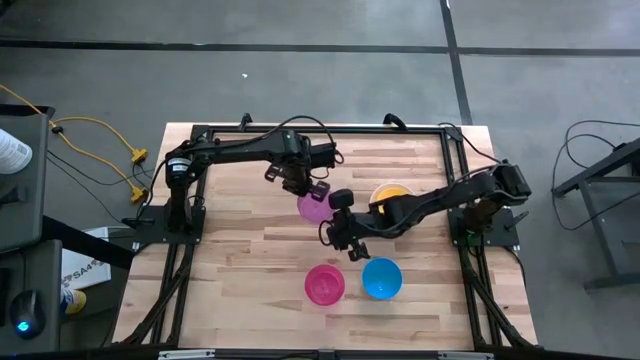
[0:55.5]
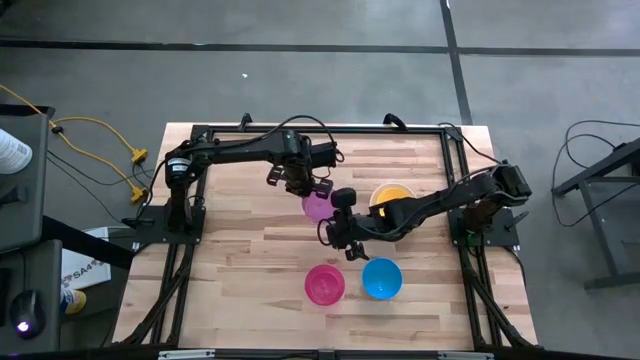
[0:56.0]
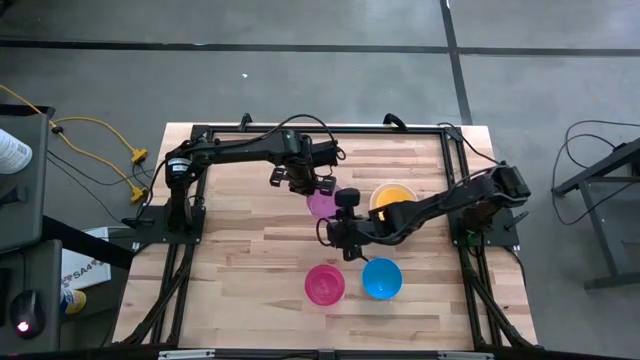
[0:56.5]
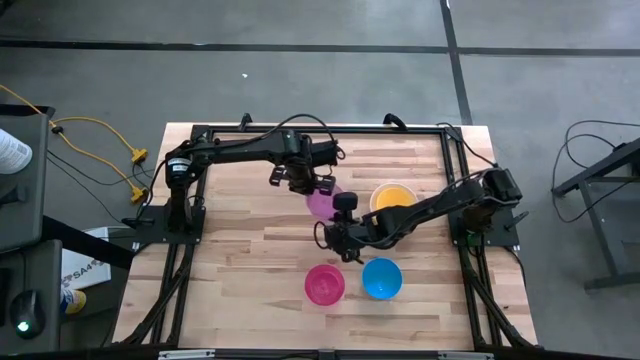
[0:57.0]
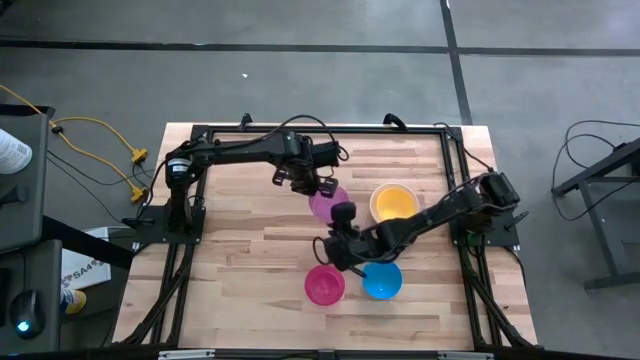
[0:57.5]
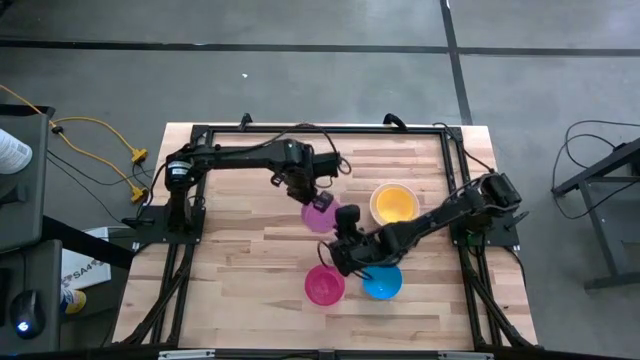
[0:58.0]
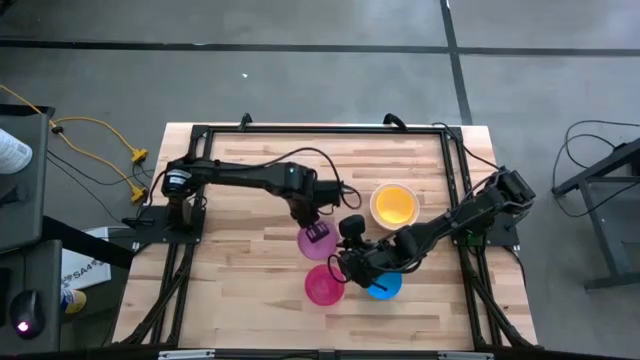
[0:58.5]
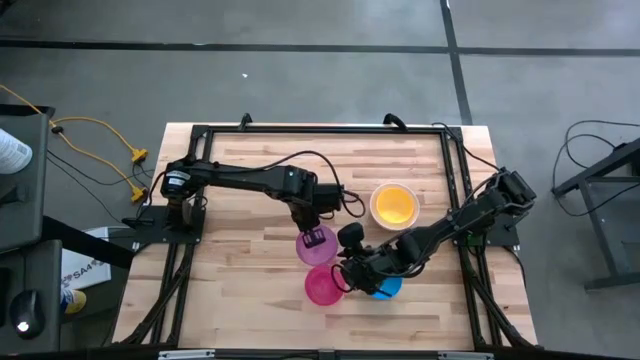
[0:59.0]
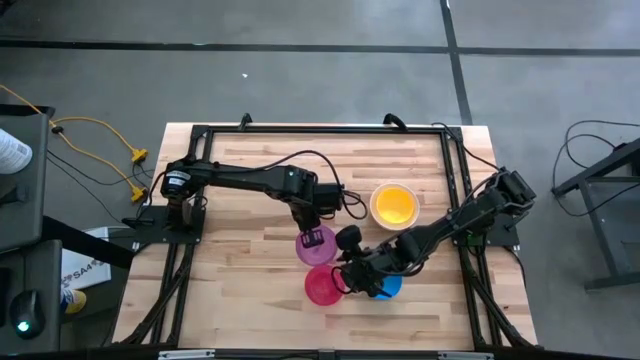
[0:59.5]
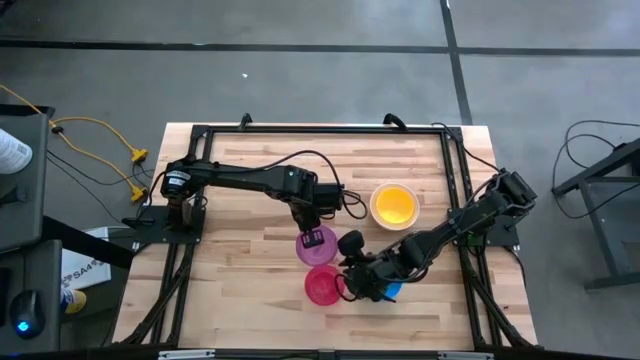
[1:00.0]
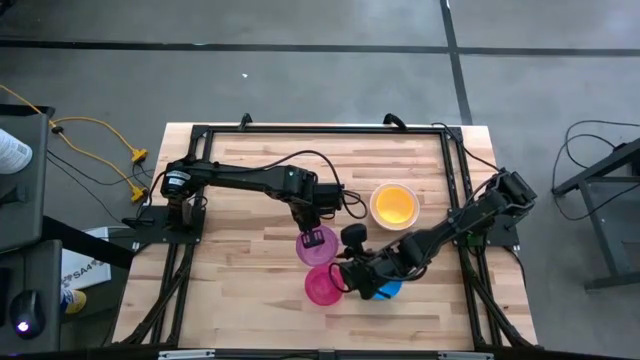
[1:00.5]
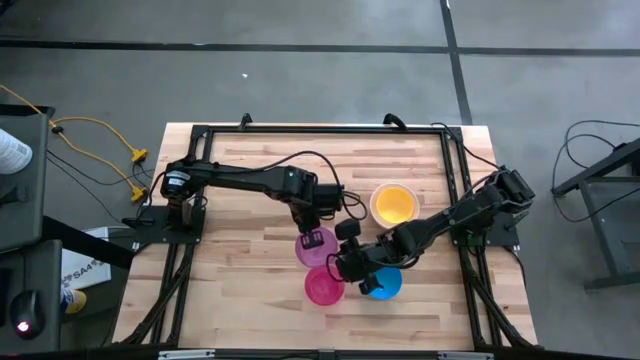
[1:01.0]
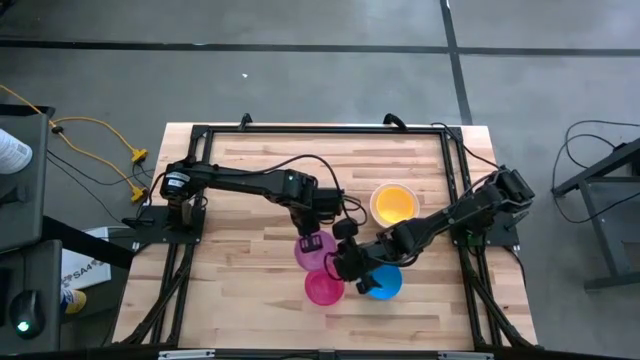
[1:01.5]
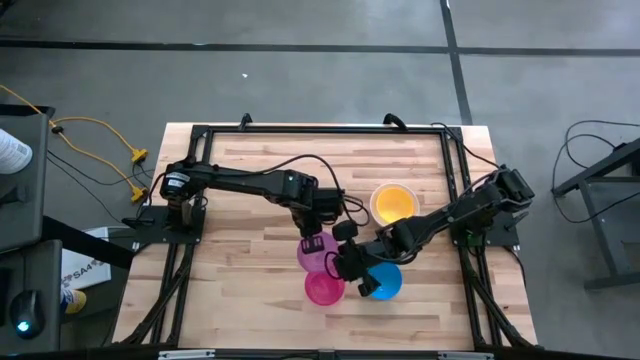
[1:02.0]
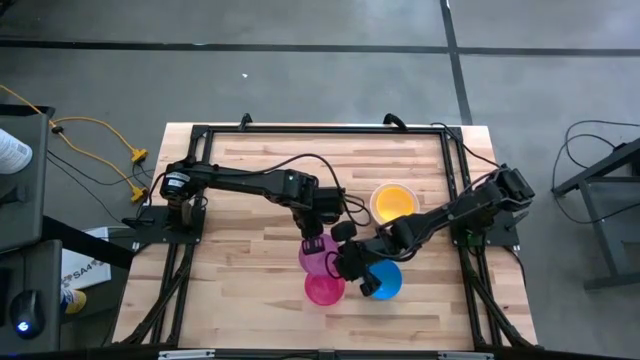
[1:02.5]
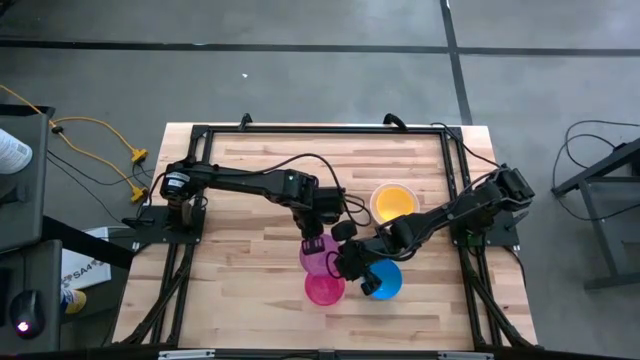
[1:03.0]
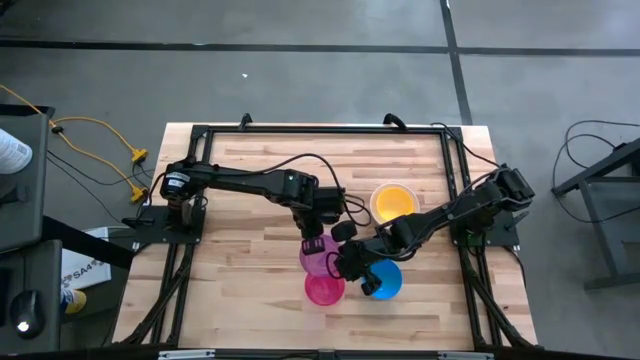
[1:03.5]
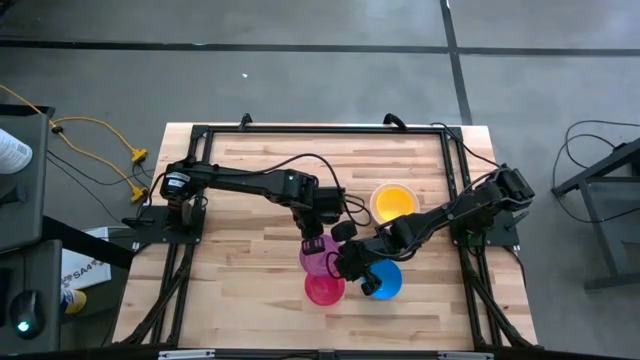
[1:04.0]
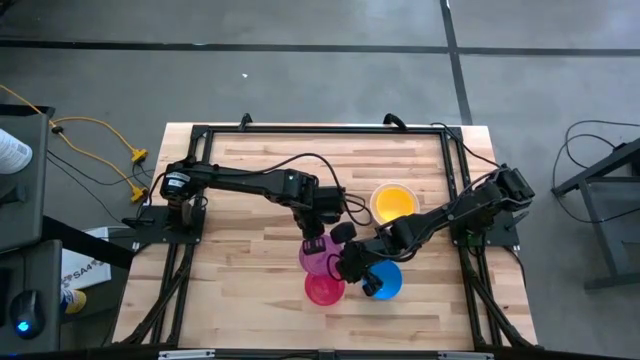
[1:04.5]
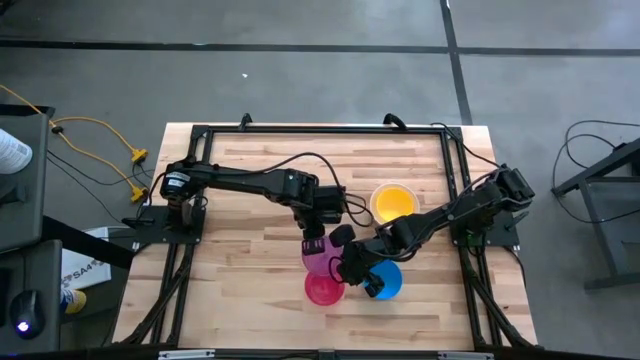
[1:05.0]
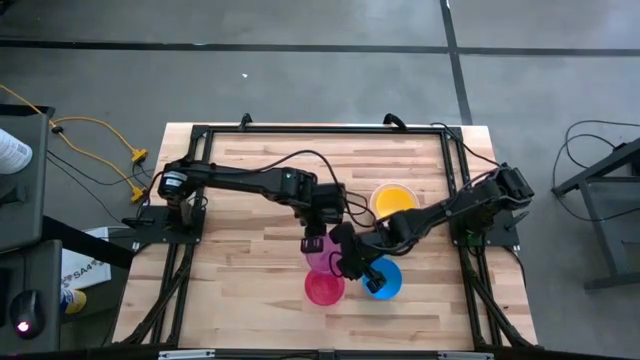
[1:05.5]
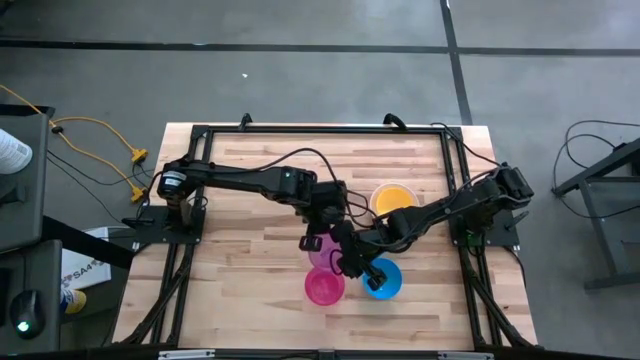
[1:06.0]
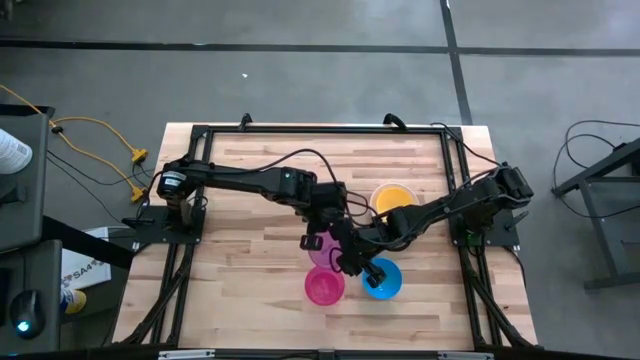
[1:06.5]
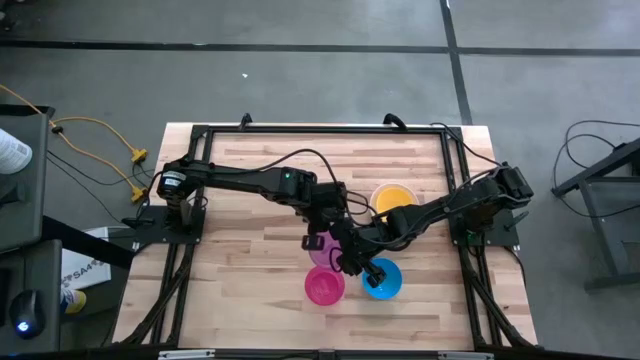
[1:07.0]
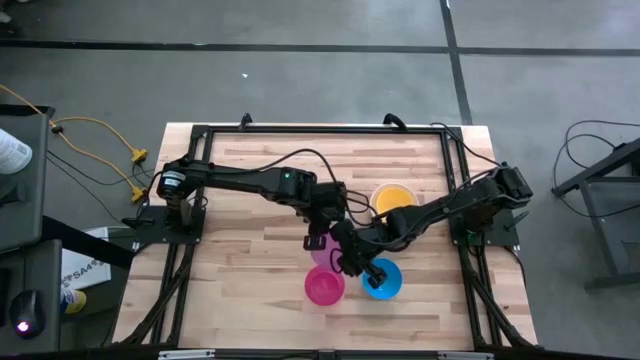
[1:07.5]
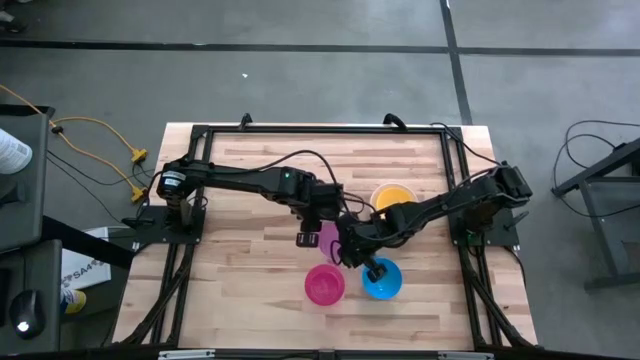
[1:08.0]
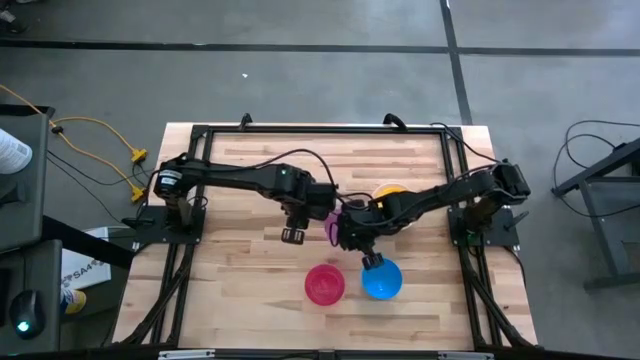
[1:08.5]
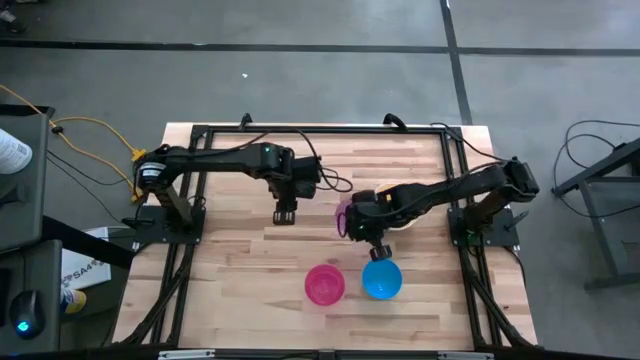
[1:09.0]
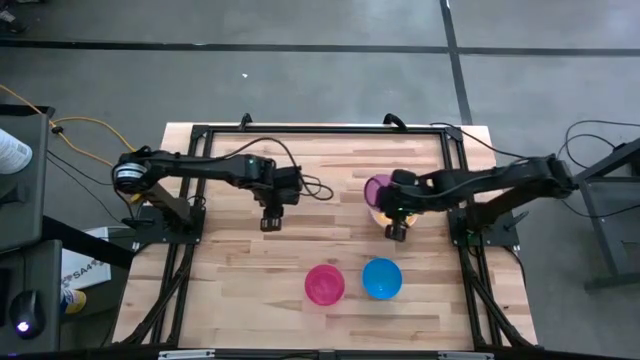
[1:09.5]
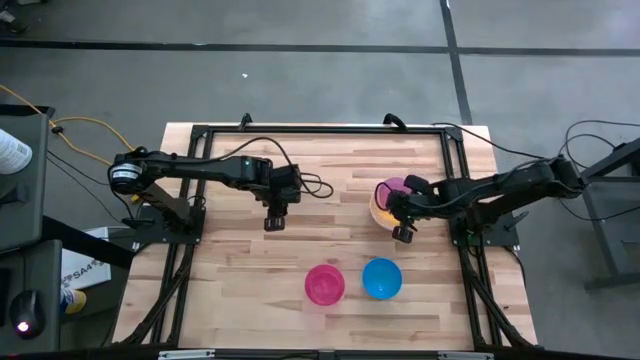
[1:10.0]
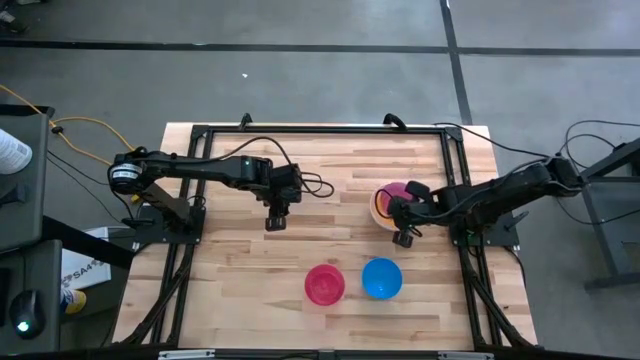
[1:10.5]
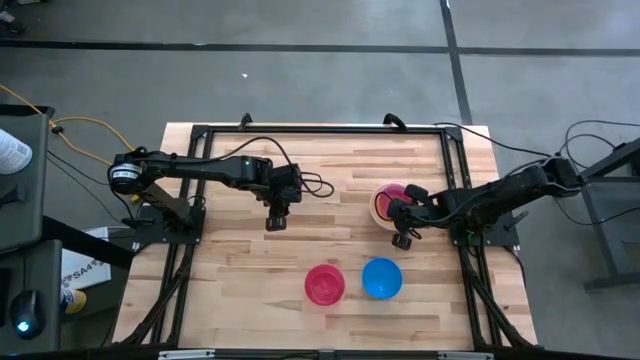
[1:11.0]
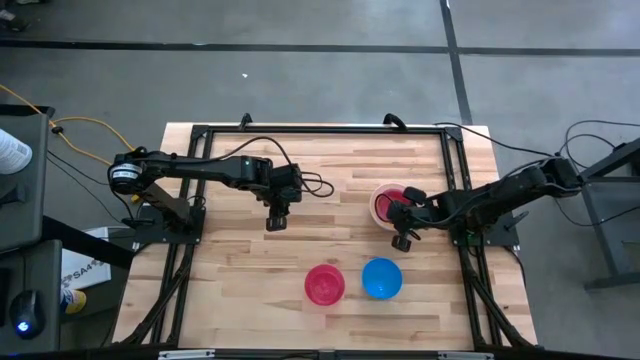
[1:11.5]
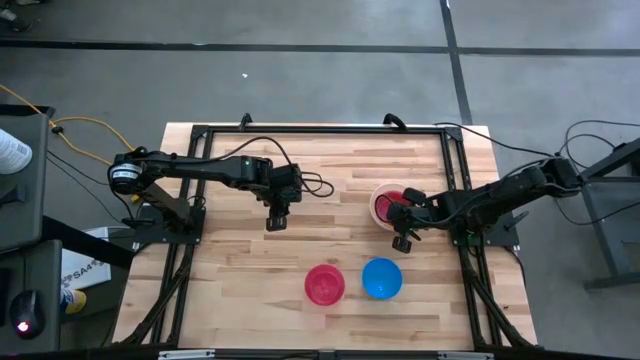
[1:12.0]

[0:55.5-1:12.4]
Stack the violet bowl on top of the yellow bowl

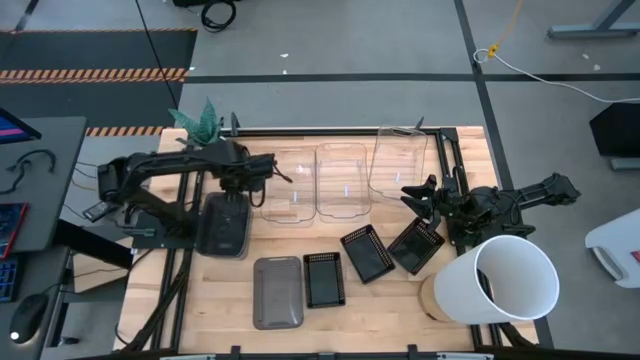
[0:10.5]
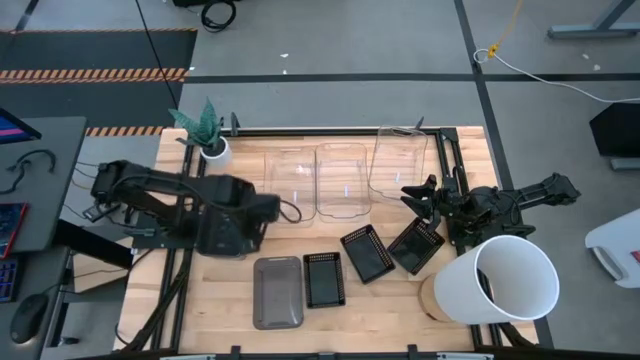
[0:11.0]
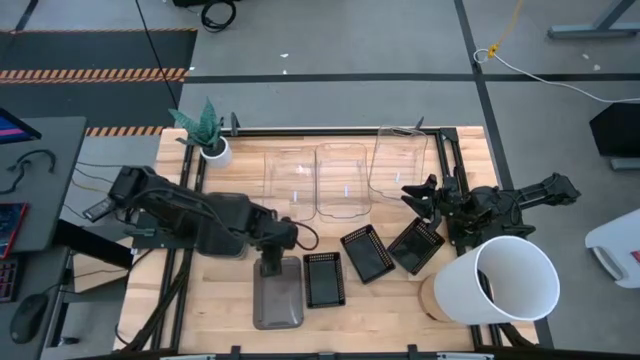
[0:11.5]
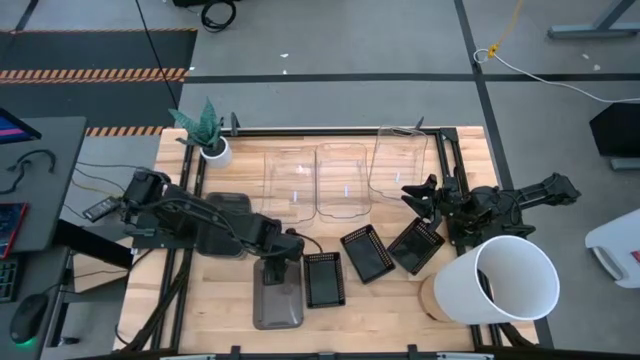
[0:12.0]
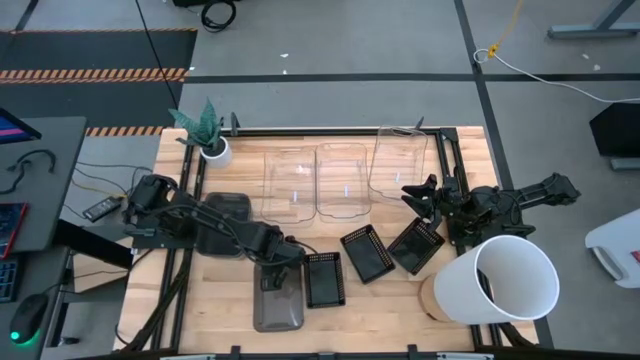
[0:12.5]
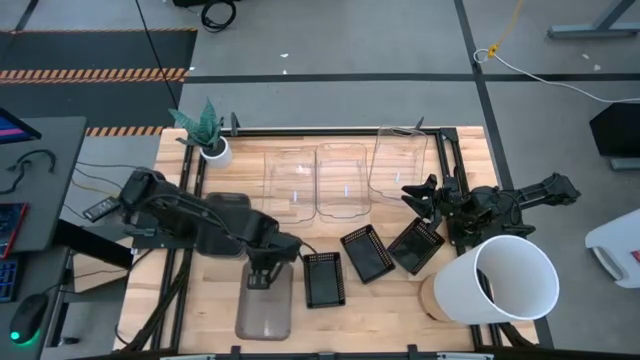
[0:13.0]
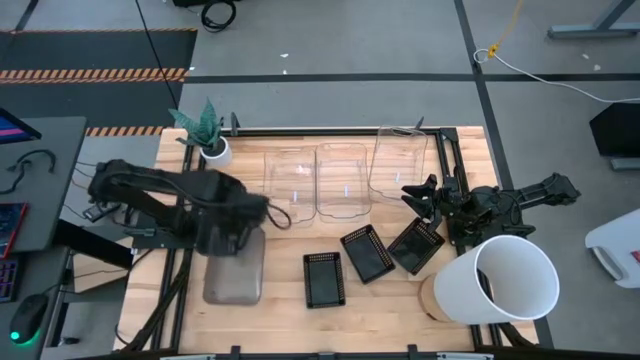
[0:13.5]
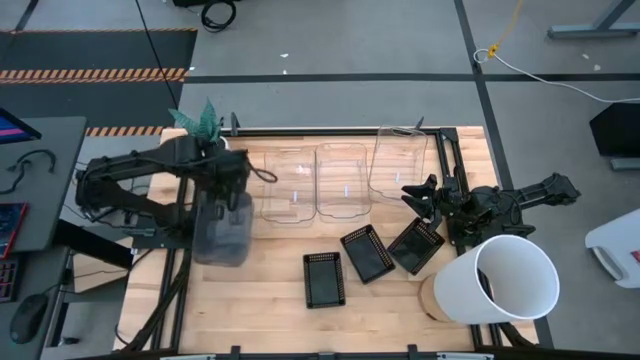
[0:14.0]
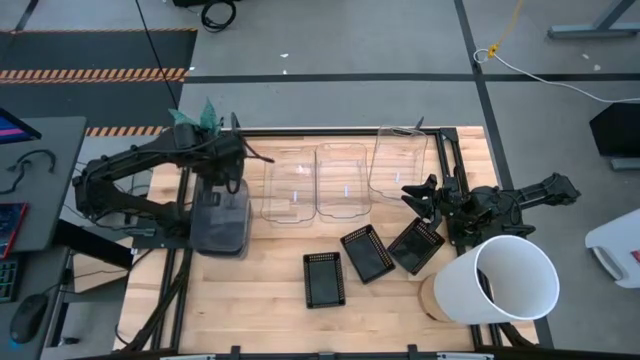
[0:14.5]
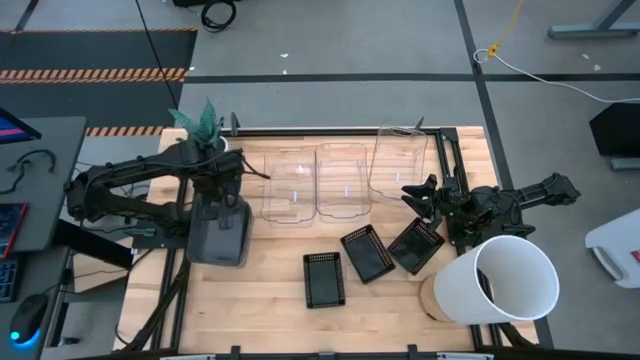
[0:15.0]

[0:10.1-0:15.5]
Stack the bottom gray bin on the top stacked gray bins
